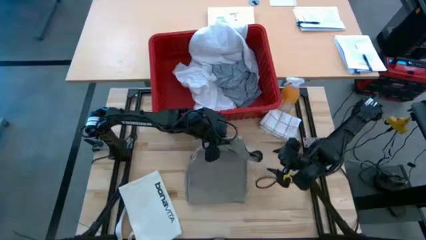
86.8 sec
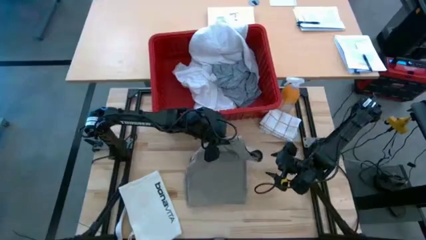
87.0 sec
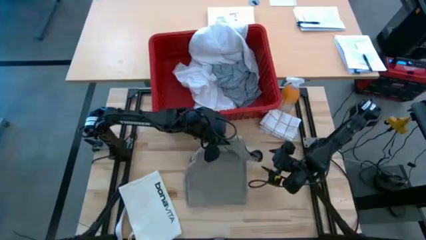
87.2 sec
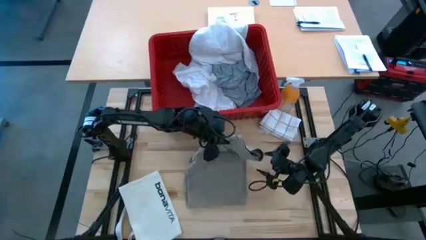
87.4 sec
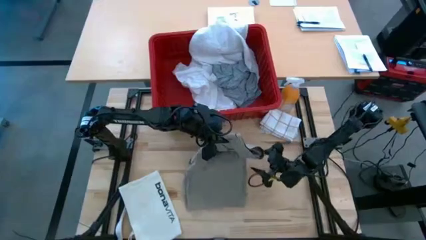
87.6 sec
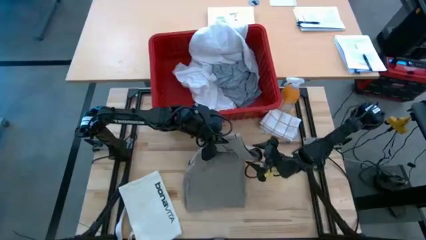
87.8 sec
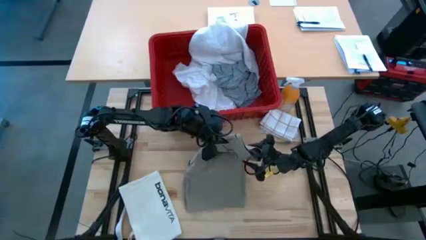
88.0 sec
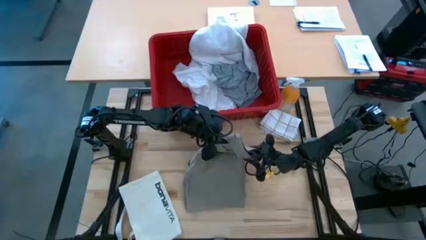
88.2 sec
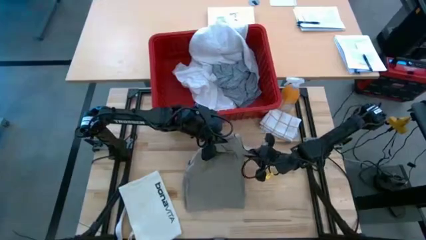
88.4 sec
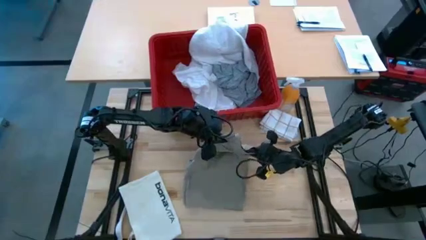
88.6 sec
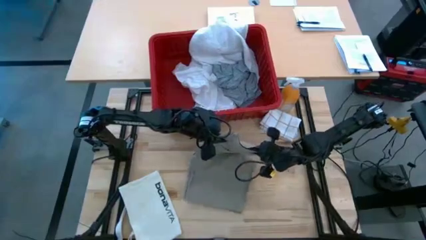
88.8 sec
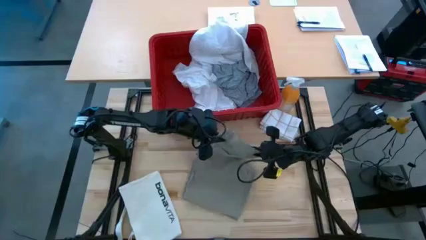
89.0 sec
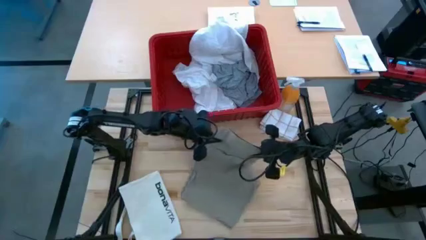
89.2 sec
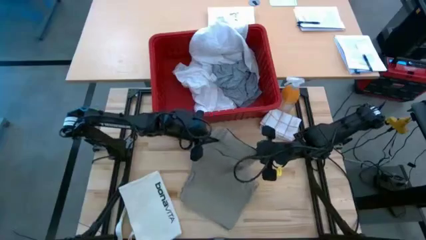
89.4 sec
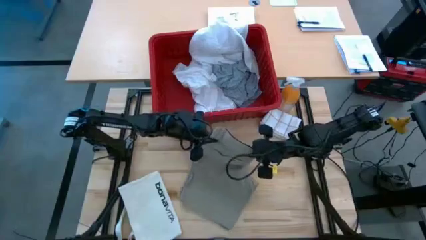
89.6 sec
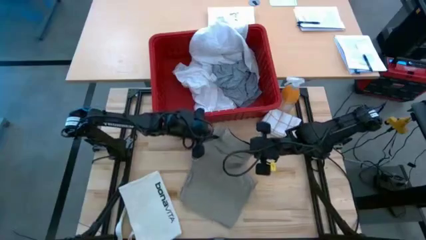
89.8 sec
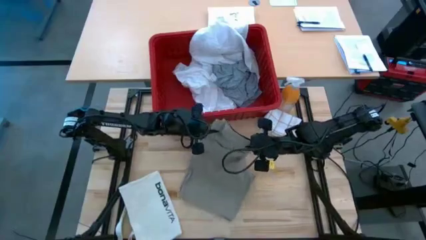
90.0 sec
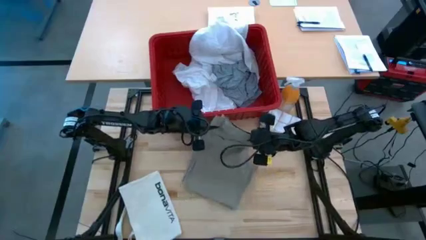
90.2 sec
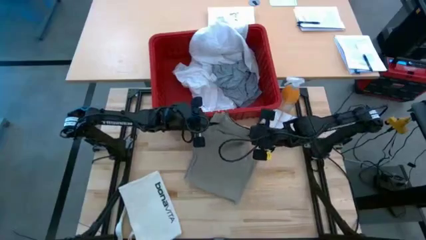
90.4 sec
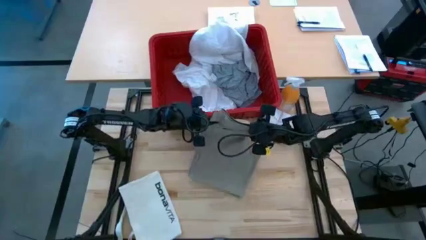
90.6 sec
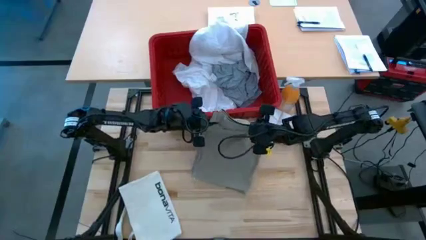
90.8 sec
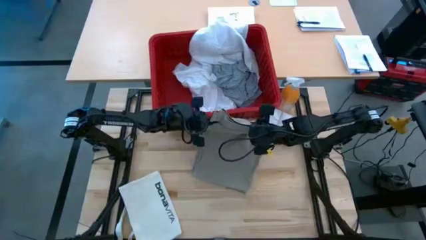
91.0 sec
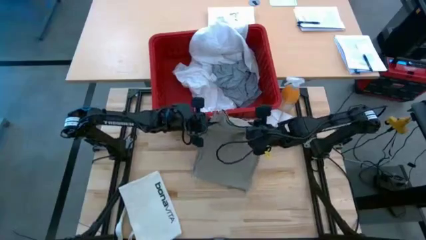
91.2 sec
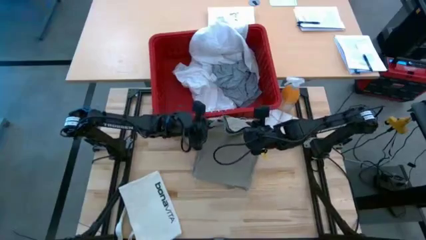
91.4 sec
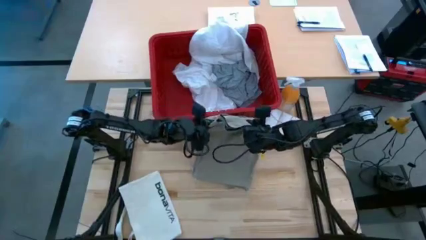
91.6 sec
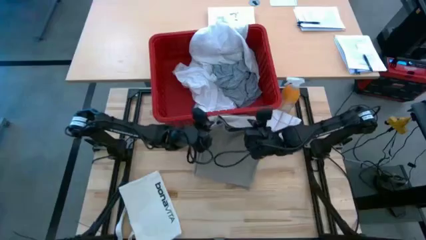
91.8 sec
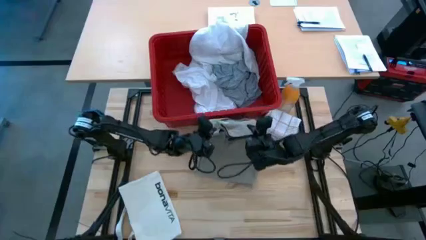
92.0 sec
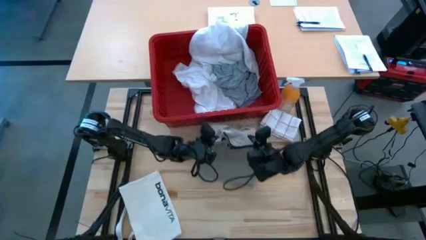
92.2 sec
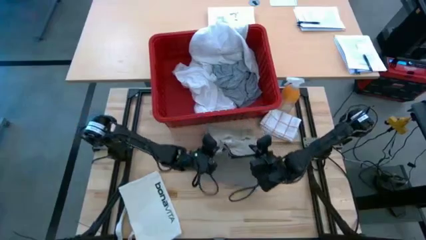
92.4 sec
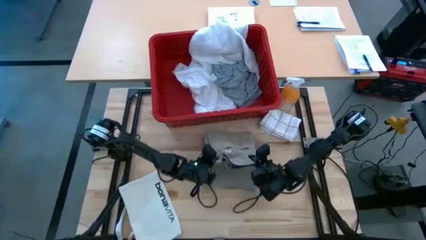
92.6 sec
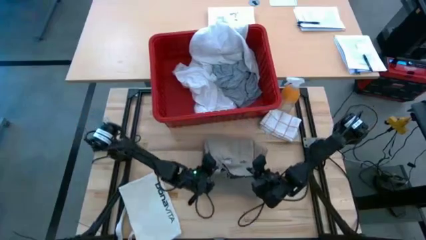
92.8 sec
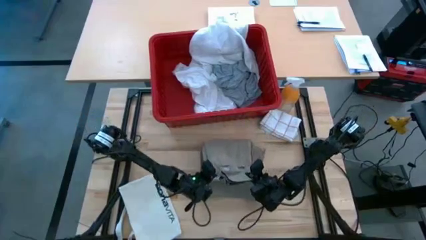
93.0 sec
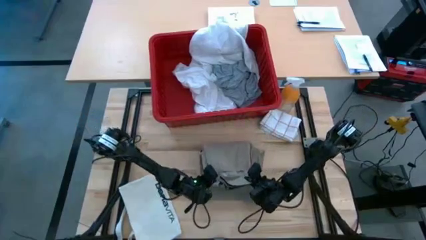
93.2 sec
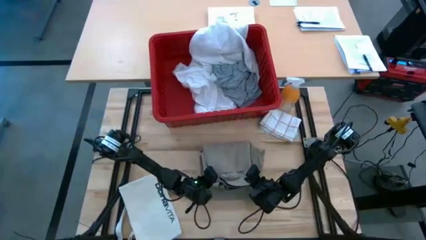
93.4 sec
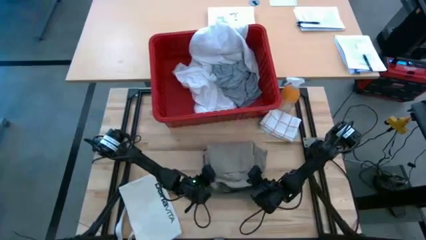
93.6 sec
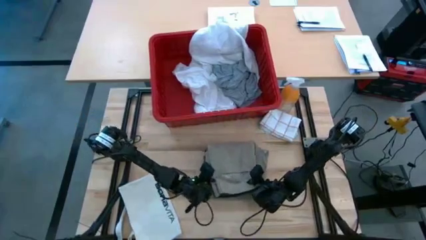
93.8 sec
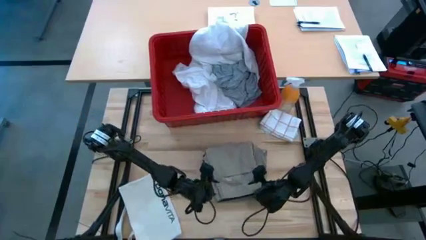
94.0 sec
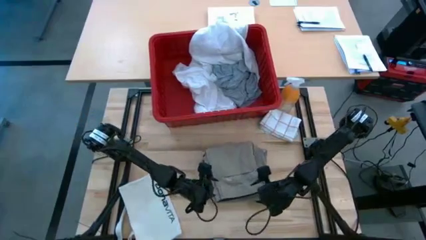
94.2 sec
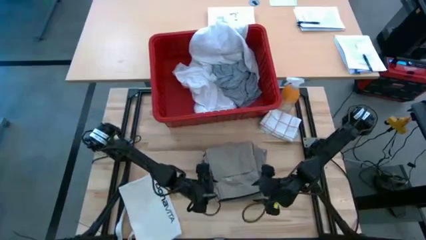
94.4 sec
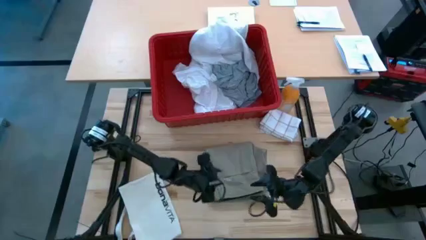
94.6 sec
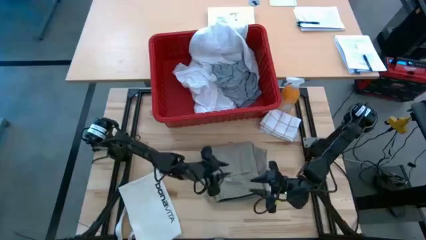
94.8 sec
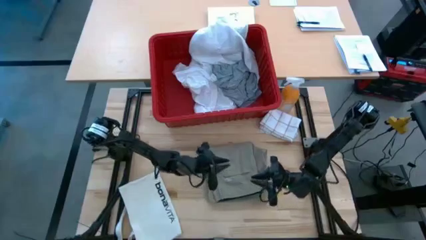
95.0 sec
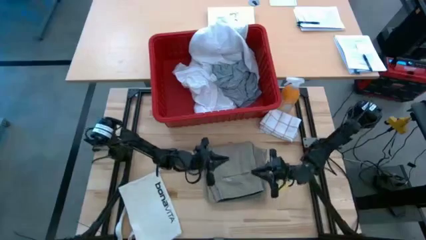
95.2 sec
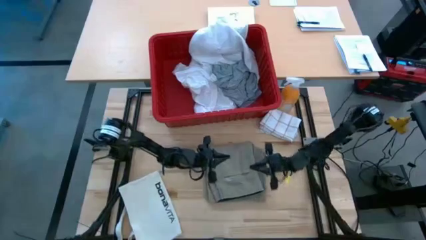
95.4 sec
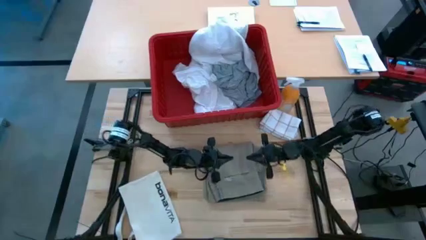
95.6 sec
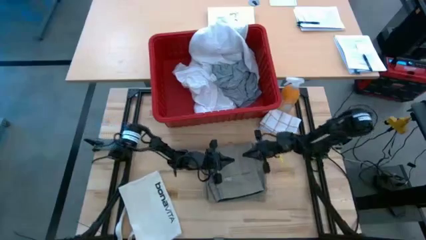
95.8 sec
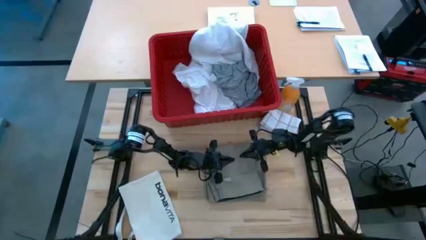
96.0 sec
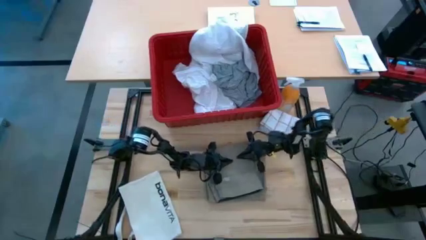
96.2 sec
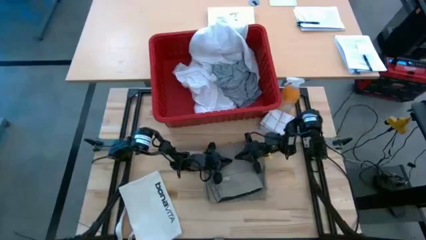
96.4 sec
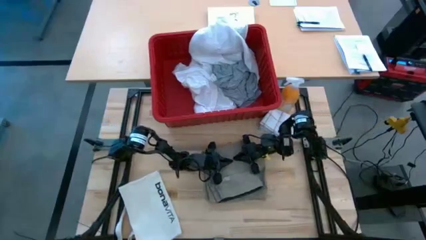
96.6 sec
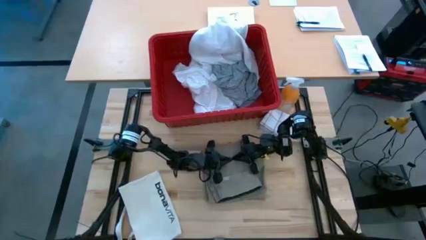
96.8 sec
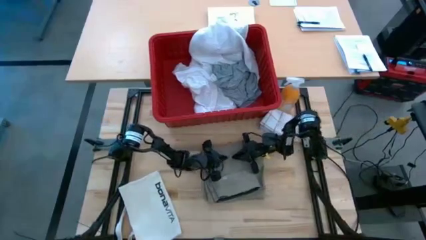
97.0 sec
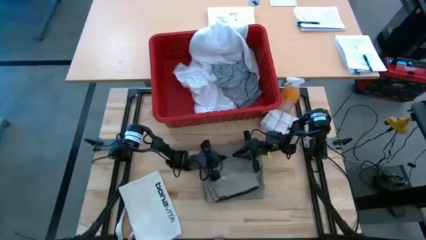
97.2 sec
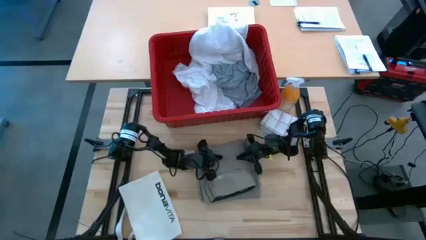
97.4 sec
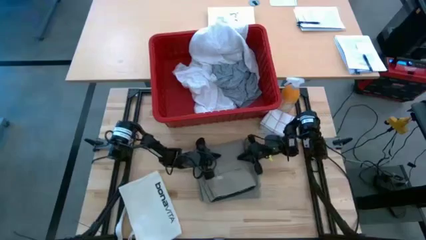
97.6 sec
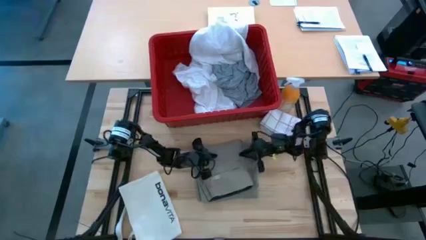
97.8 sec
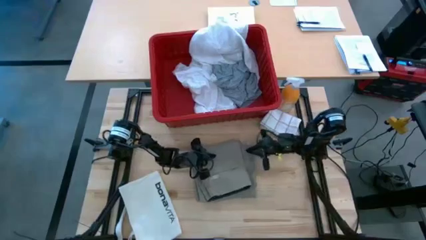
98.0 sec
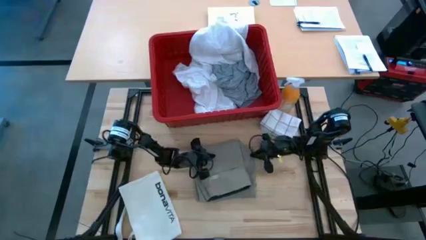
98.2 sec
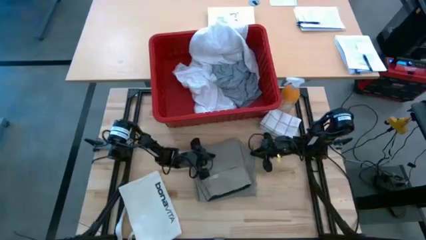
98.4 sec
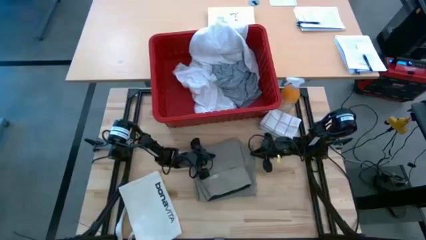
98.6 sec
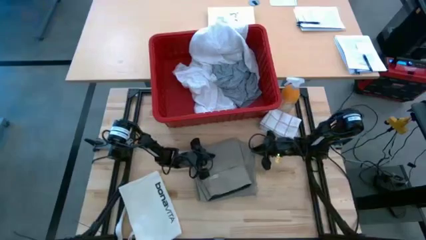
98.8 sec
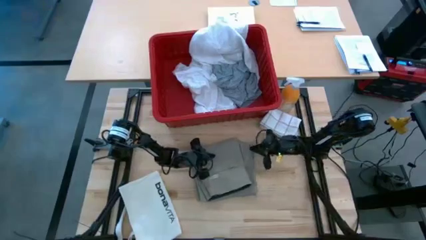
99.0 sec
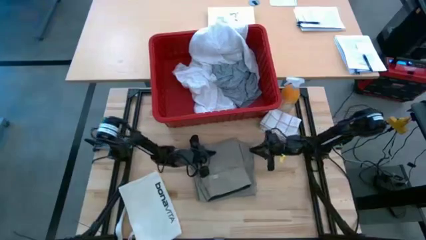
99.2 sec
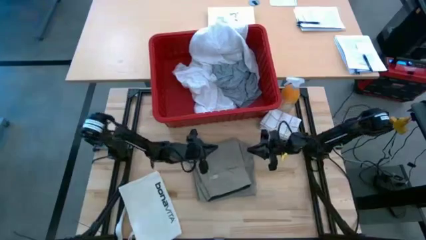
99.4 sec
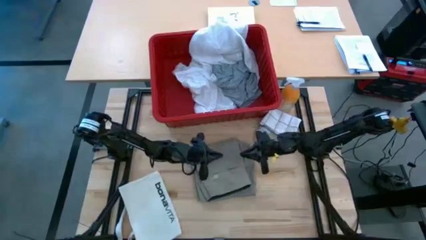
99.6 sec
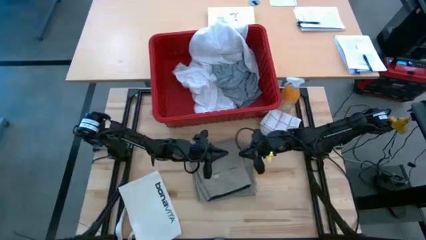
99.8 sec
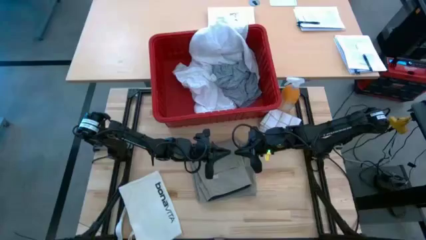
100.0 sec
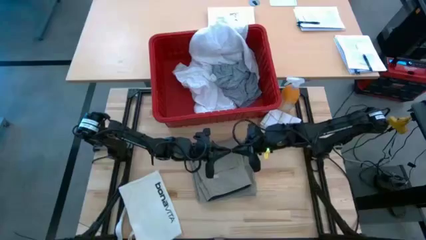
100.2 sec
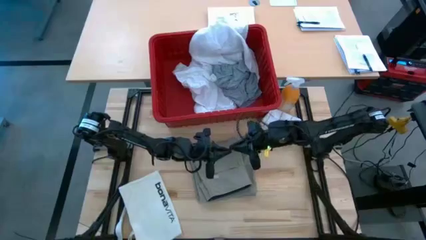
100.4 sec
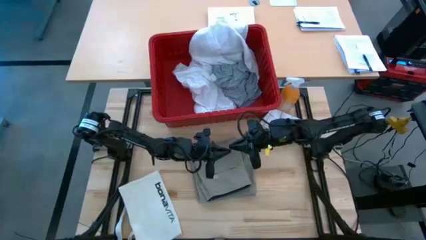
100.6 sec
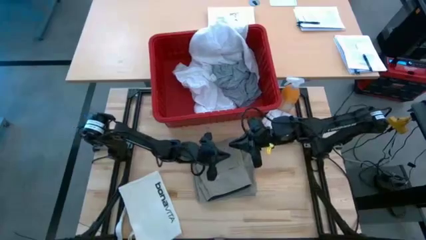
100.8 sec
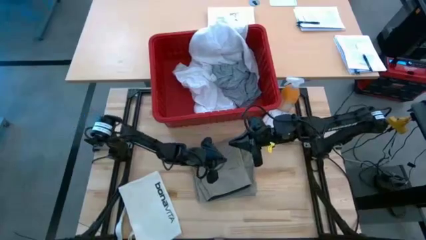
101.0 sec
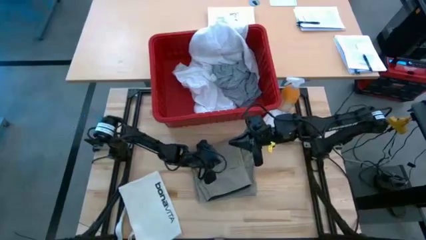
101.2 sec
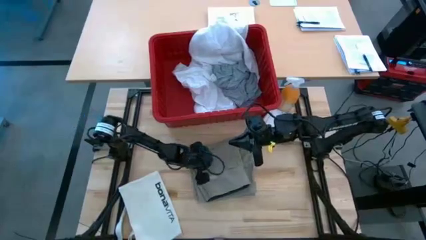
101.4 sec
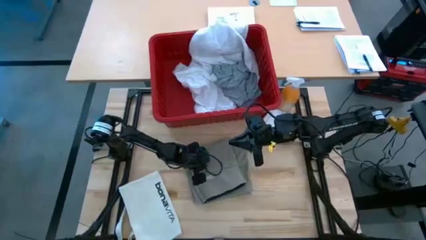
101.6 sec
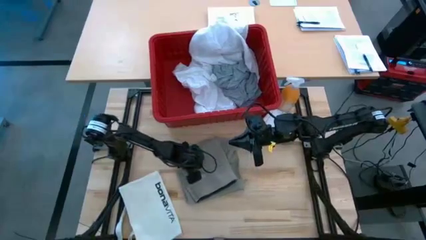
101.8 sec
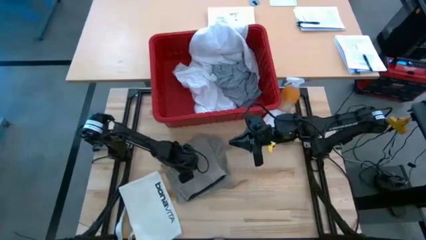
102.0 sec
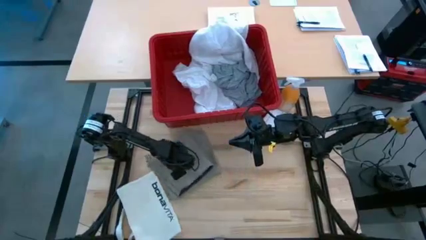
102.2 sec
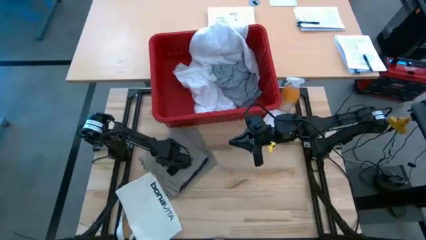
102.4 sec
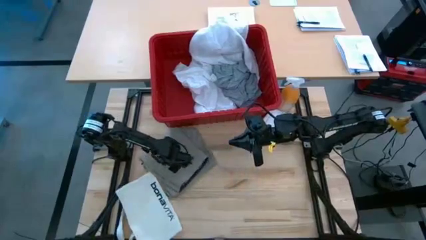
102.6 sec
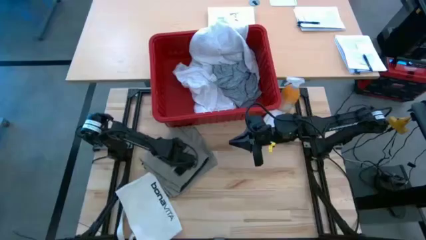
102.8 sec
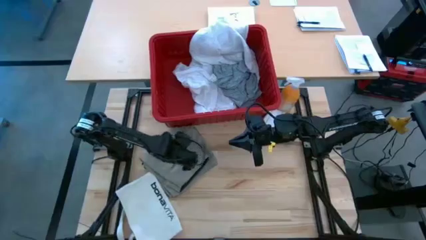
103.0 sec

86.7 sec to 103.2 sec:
Task: Fold laundry
Fold the brown shorts
